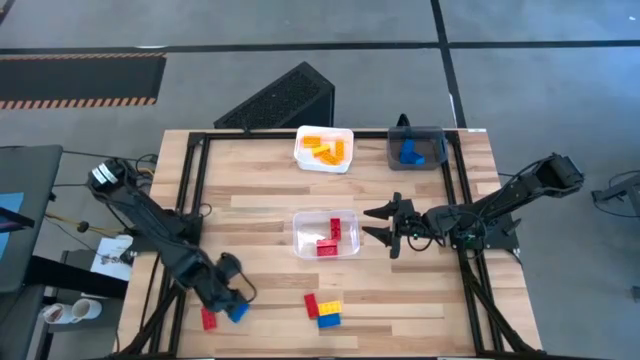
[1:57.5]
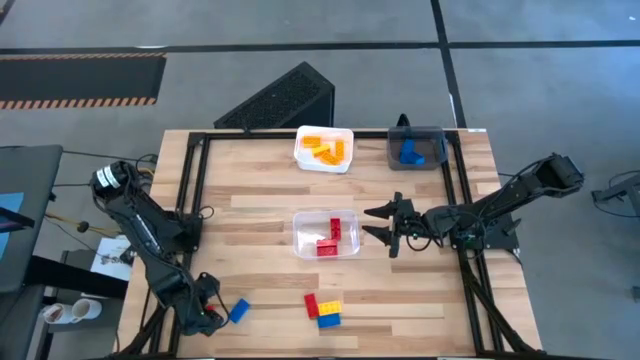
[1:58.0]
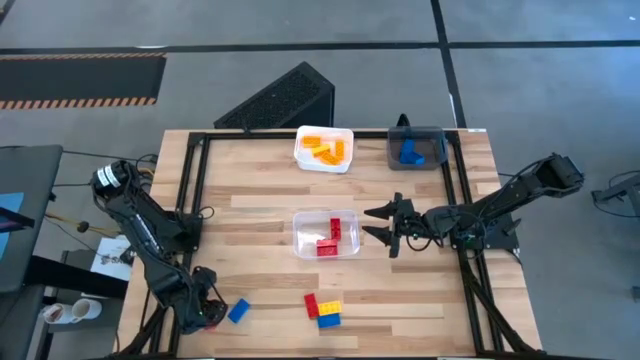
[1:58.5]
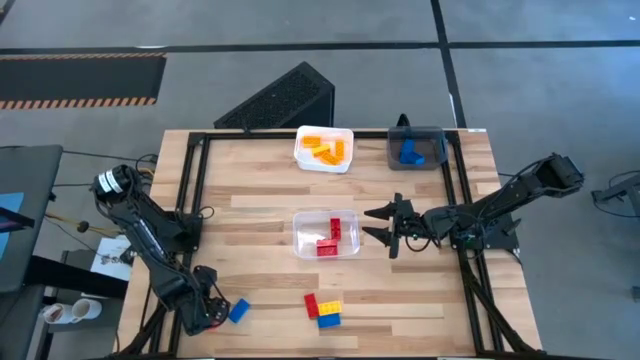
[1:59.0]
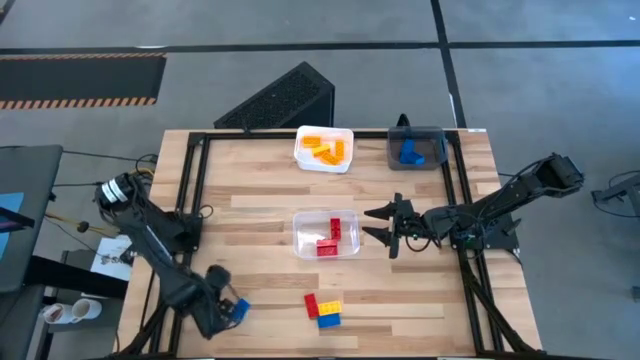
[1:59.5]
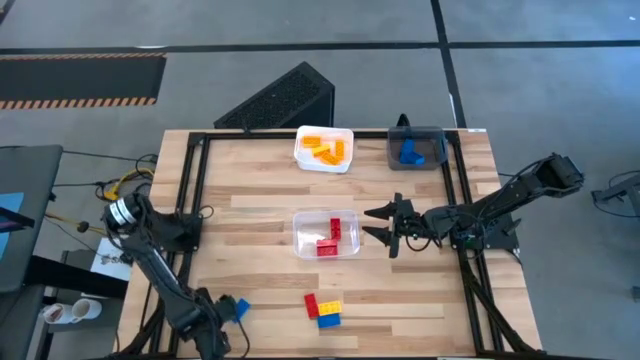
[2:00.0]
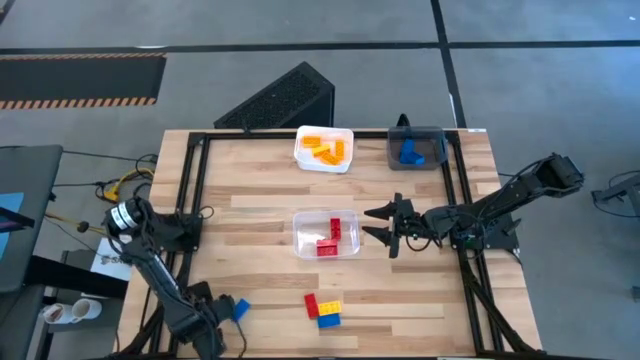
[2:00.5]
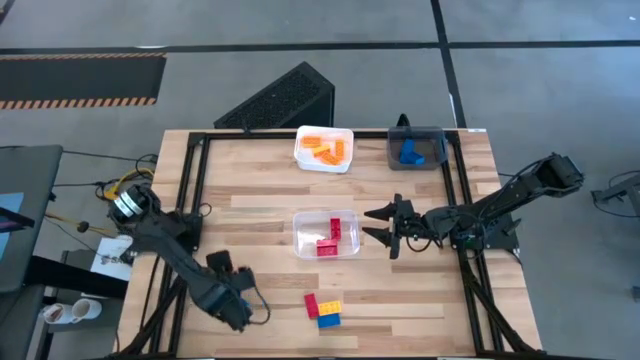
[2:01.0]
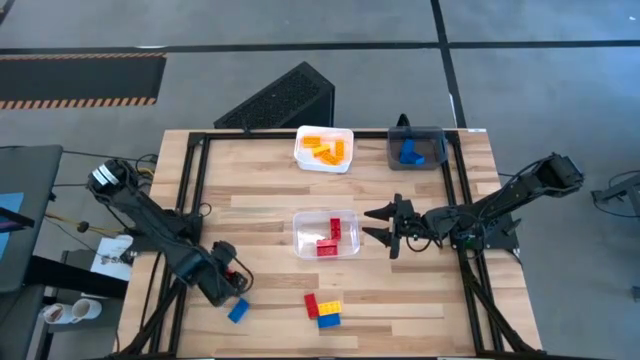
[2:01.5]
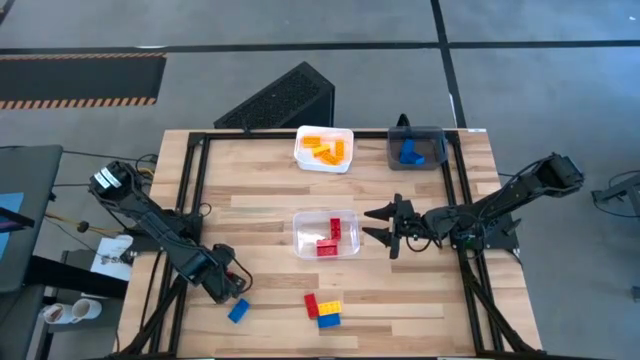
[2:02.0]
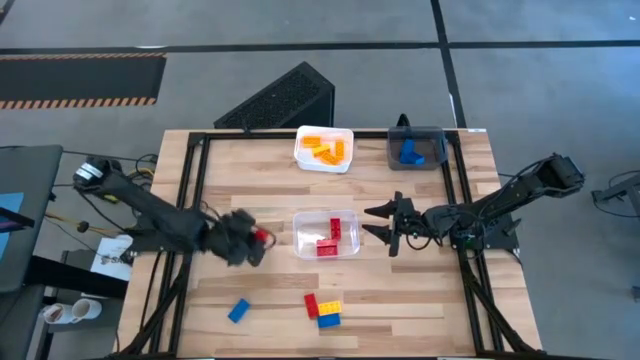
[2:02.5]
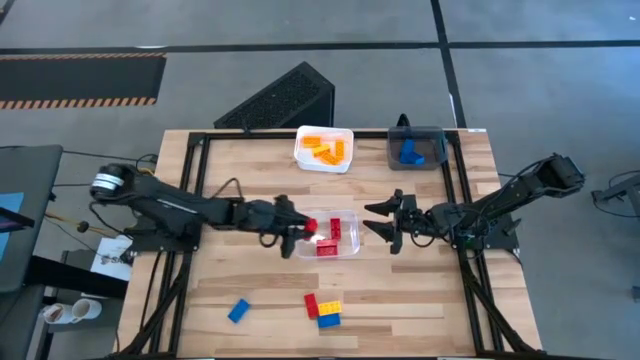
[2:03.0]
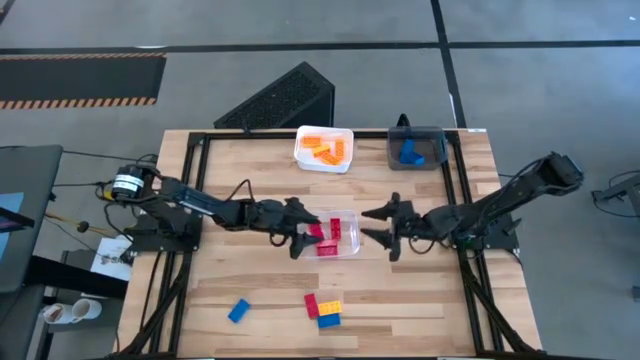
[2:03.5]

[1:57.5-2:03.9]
Task: Sort & place blocks by color
Put the red game piece into the transparent bin

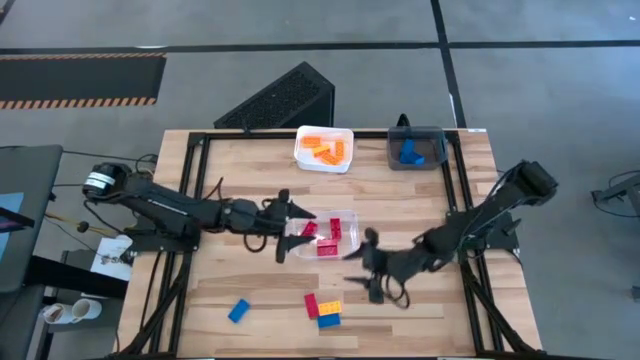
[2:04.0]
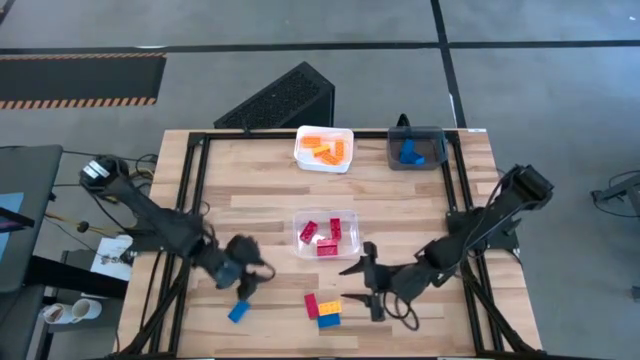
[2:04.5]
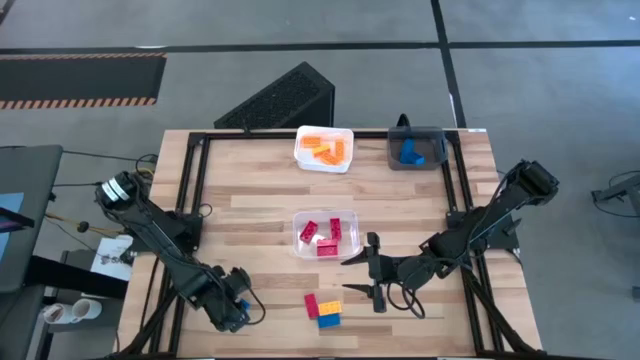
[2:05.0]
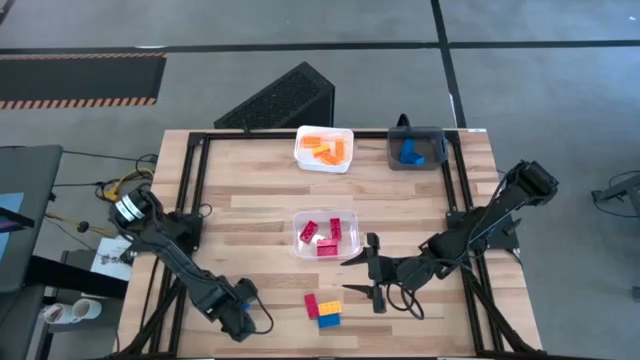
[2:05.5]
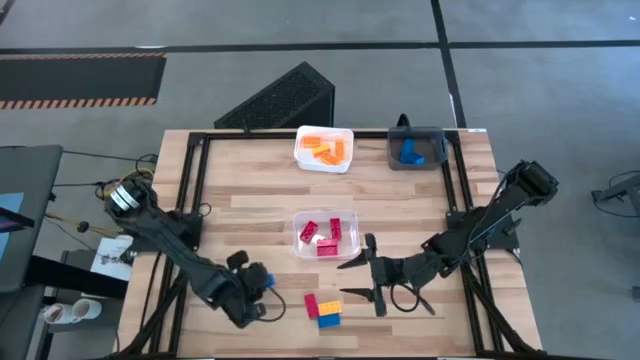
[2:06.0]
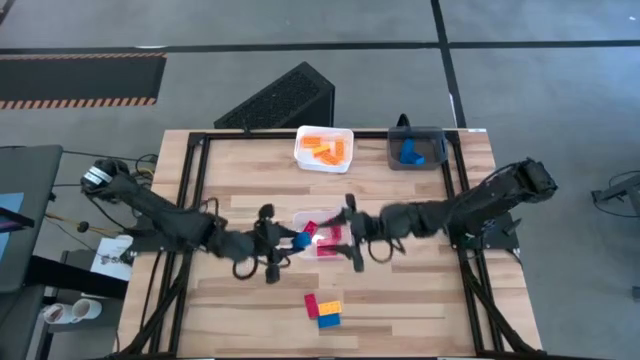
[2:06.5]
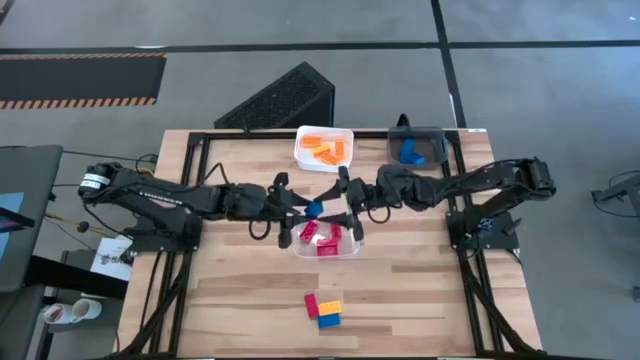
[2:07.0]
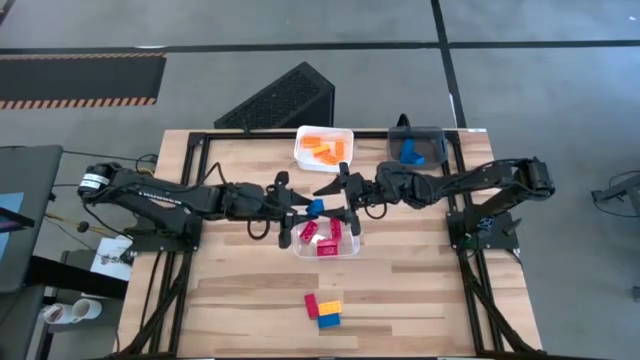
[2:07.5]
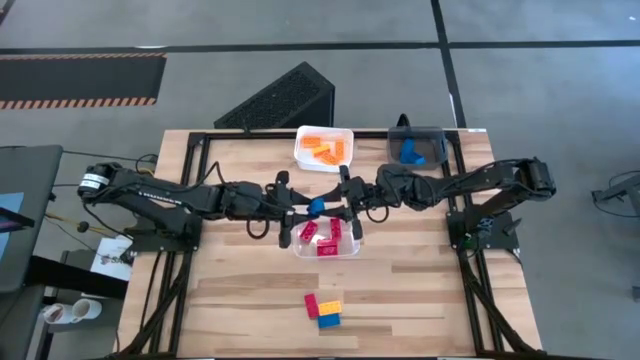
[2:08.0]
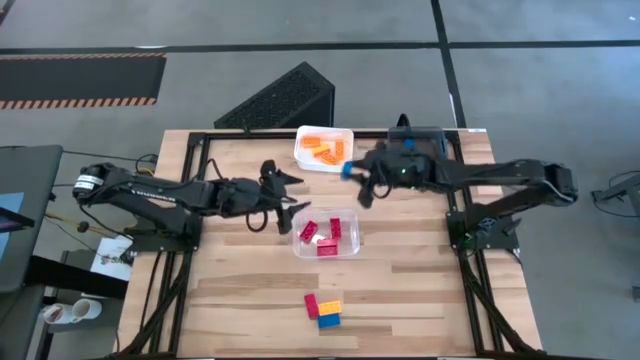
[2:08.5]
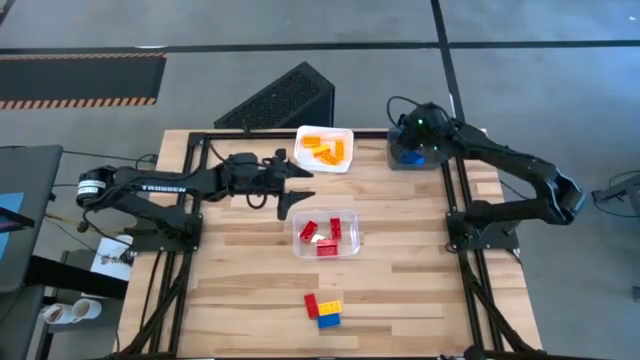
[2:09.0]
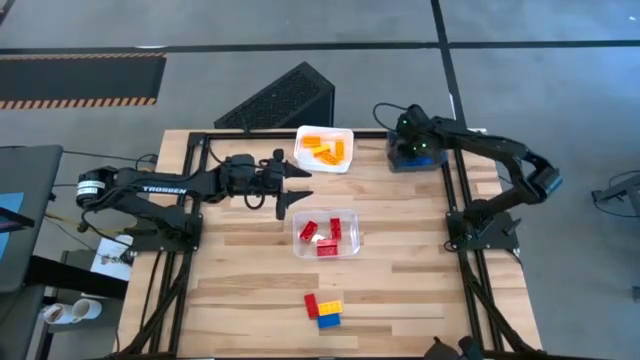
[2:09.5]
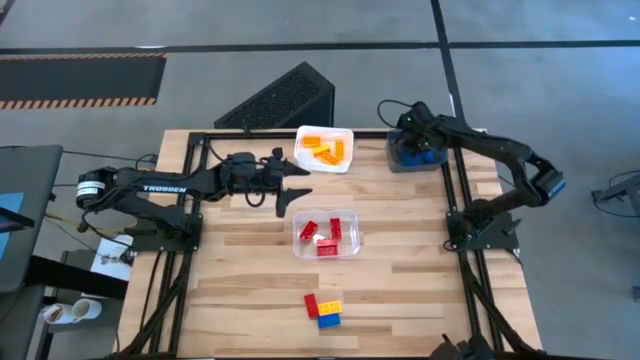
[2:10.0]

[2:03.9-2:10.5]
Put the blue game piece into the black bin

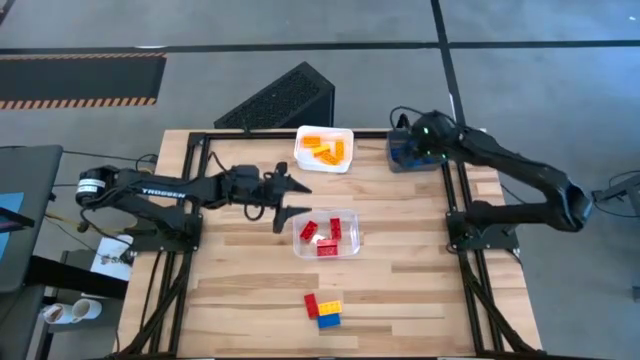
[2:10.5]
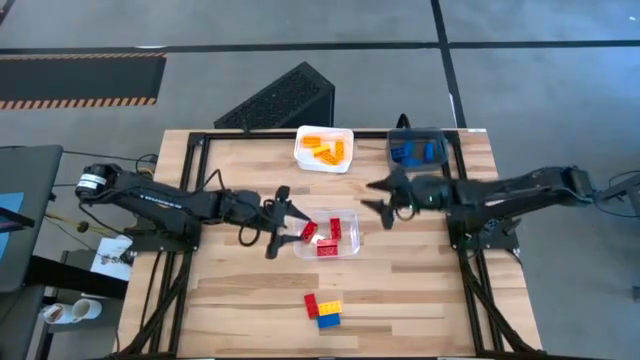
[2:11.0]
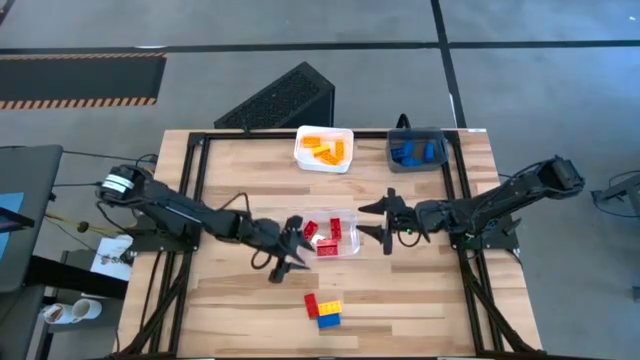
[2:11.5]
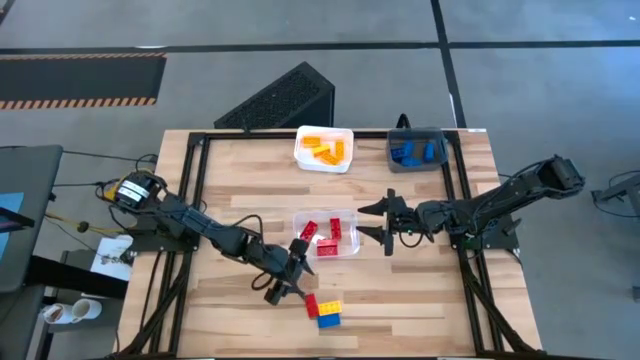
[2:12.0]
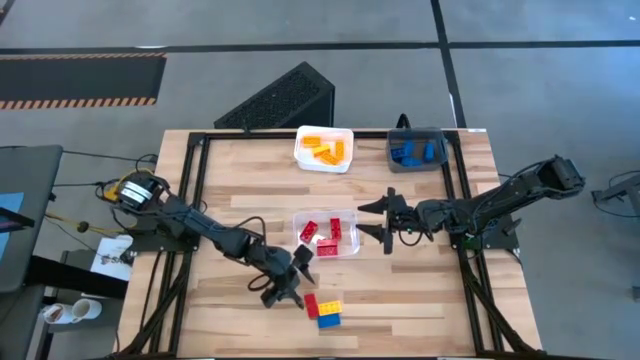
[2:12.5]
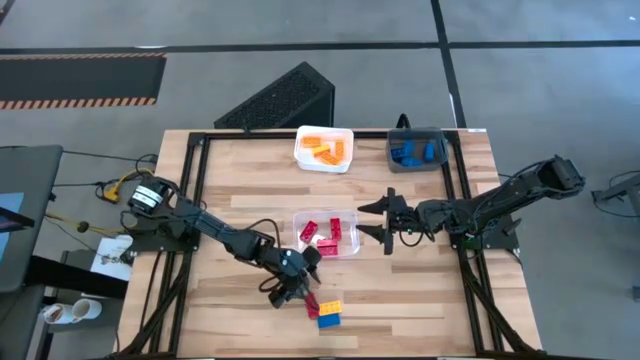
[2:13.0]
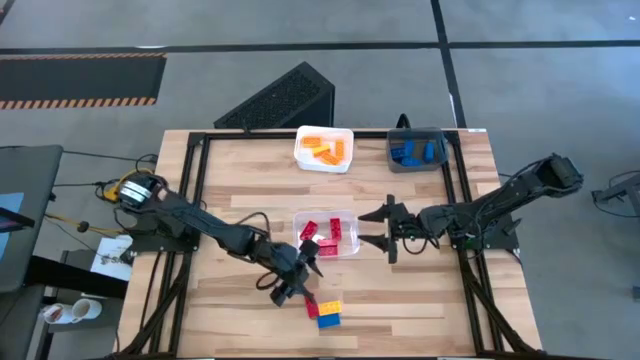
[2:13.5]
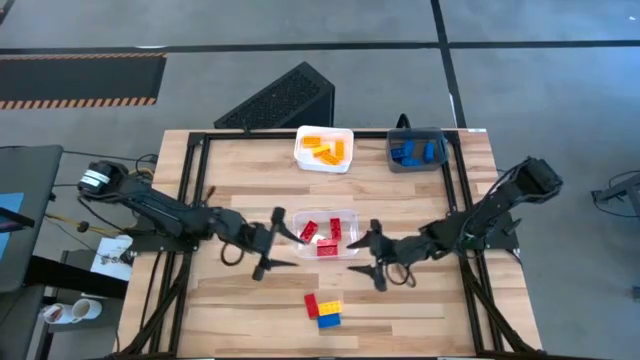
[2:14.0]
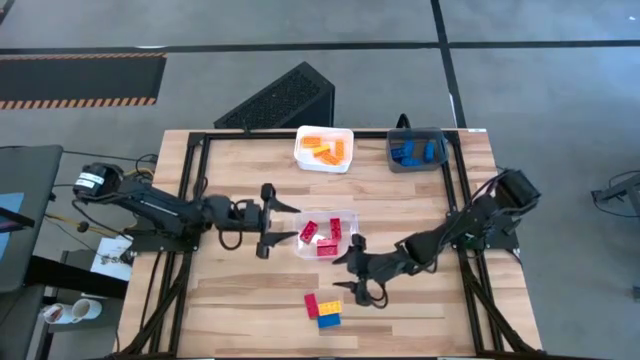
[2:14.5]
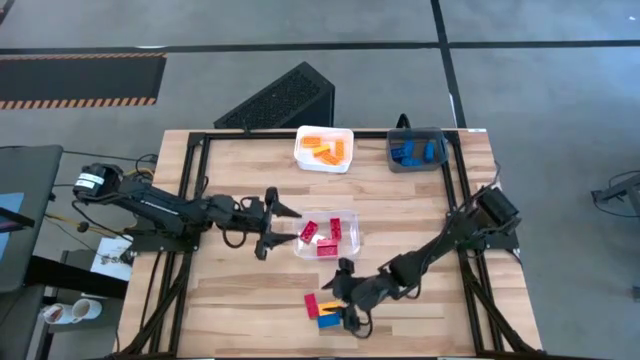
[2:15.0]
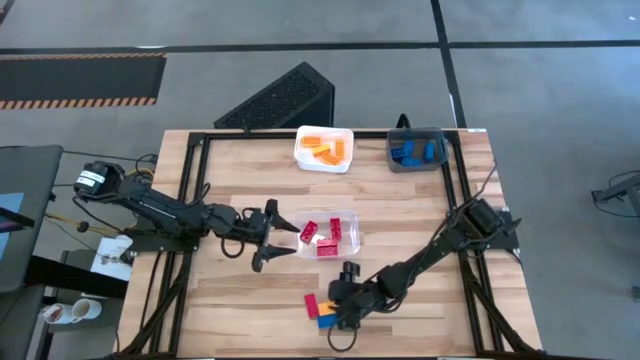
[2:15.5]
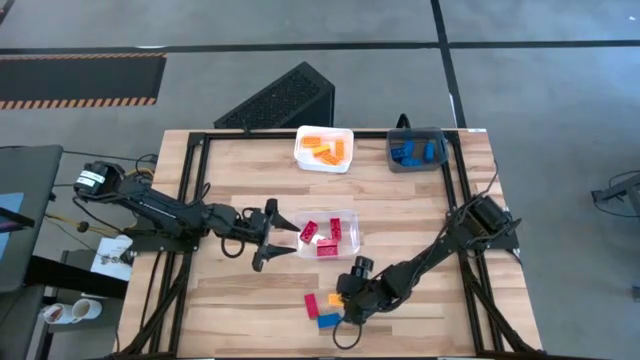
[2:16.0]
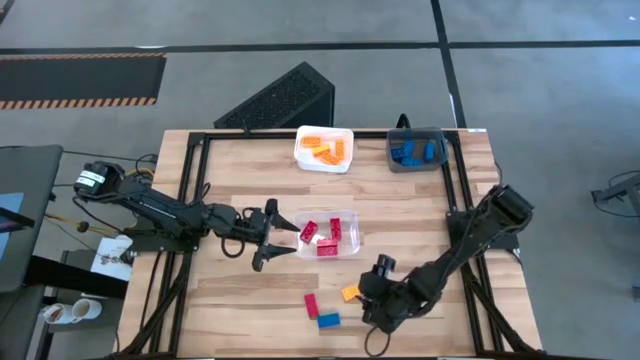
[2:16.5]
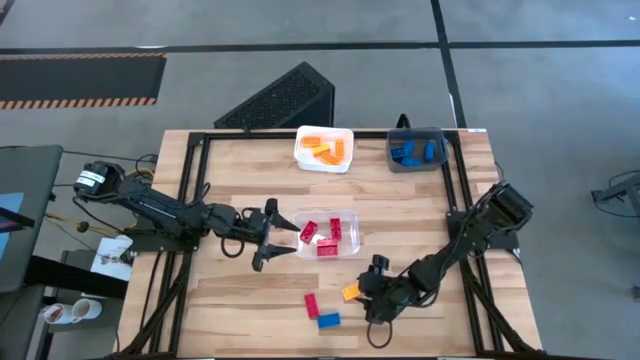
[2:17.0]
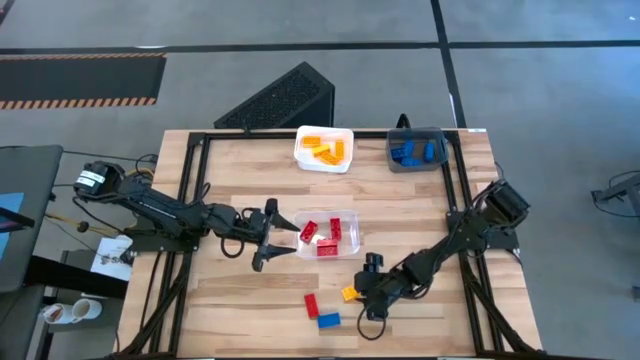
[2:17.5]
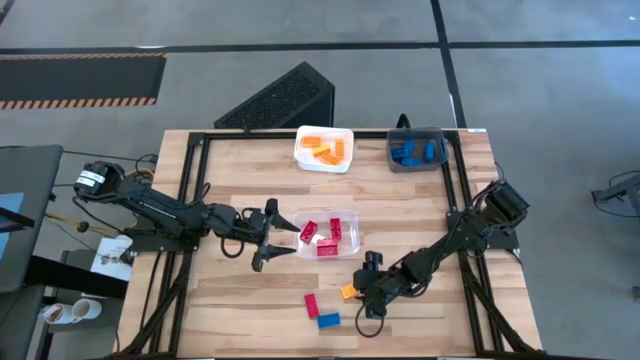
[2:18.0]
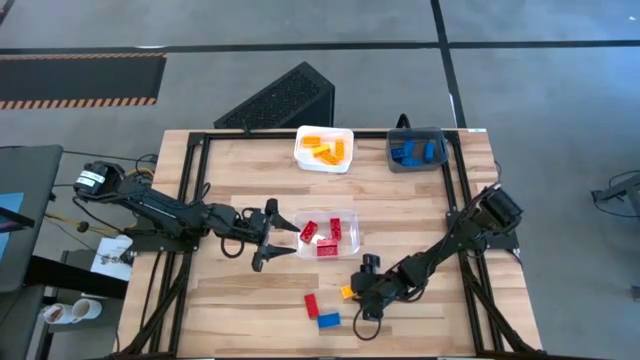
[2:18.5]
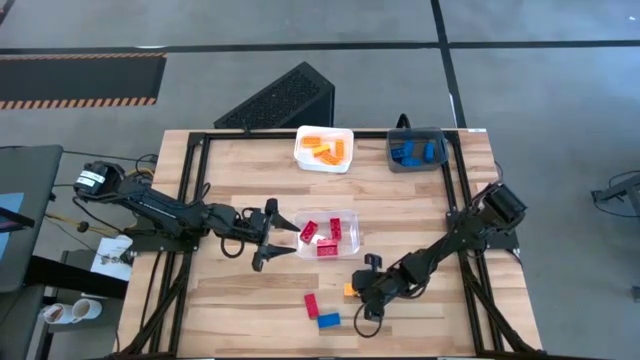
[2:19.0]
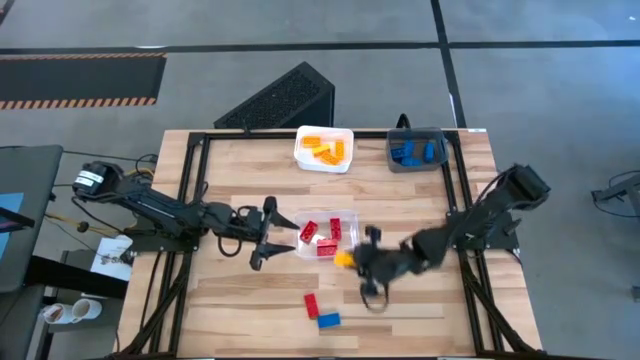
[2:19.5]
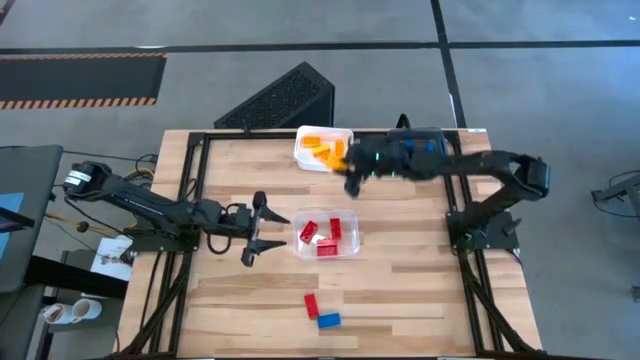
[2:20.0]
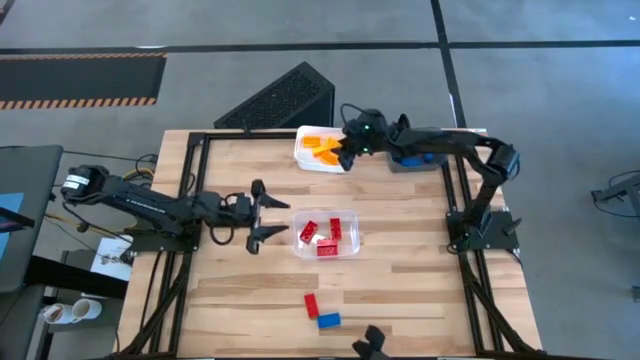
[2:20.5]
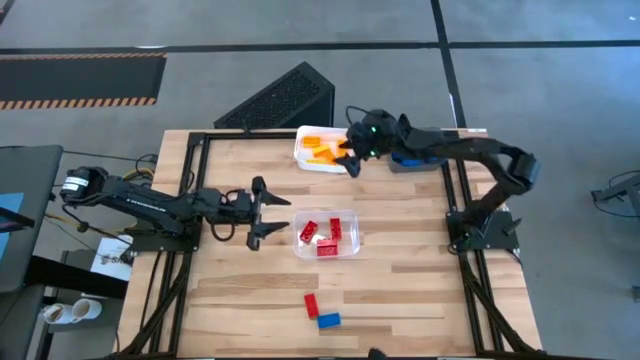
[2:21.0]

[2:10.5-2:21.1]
Put the yellow game piece into the white bin
